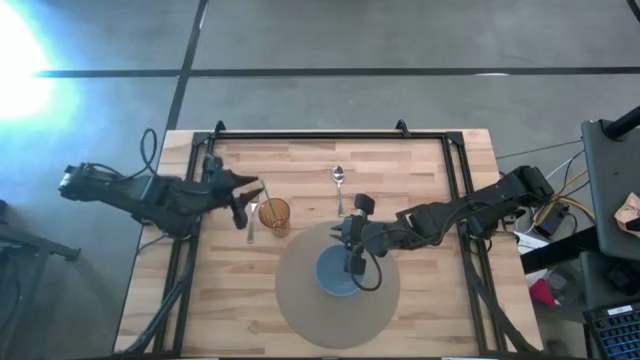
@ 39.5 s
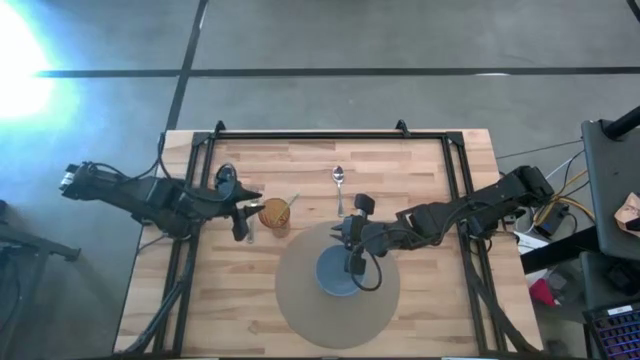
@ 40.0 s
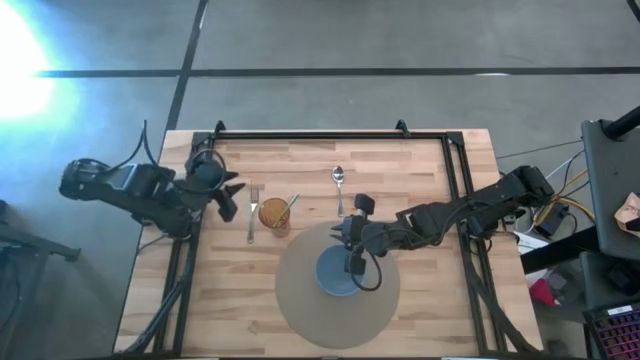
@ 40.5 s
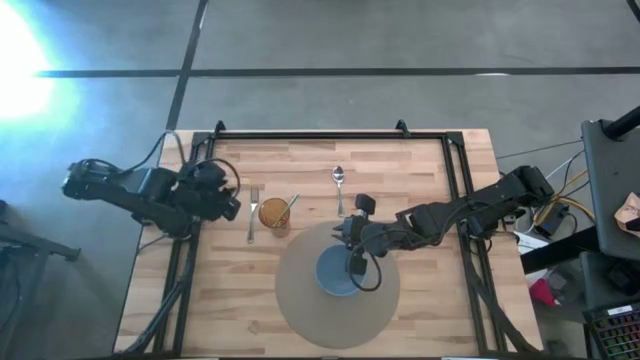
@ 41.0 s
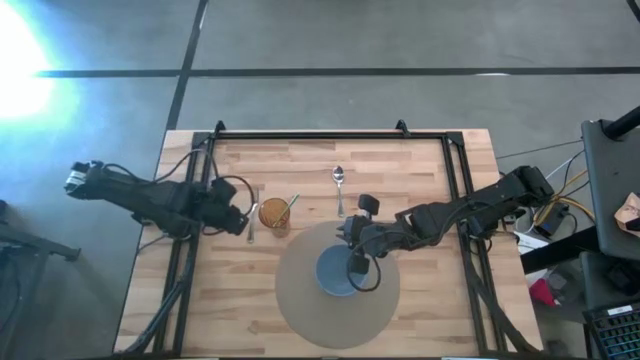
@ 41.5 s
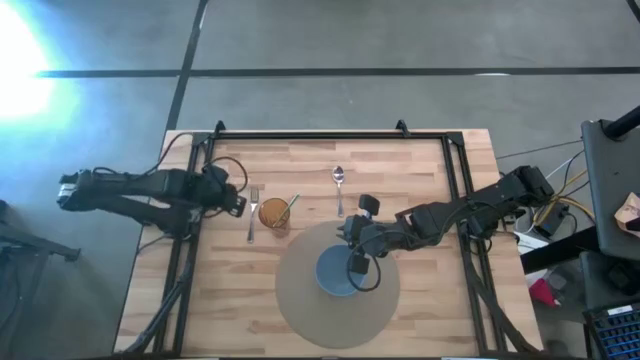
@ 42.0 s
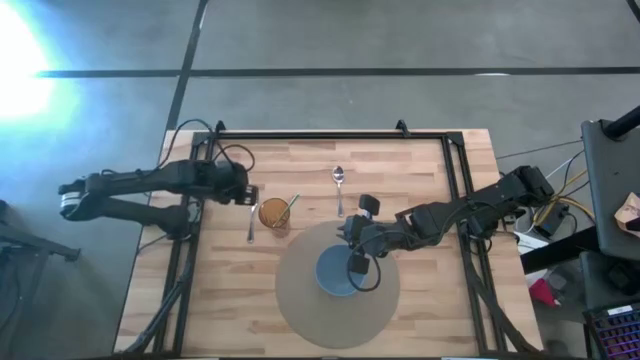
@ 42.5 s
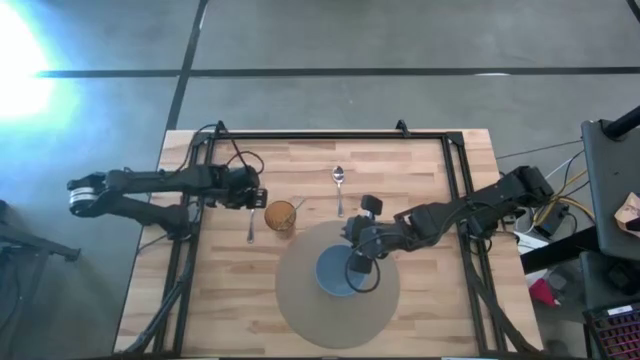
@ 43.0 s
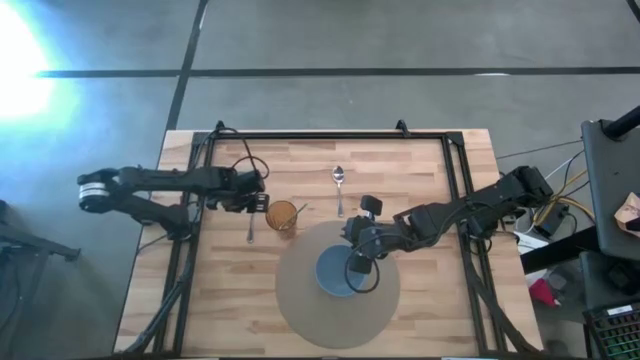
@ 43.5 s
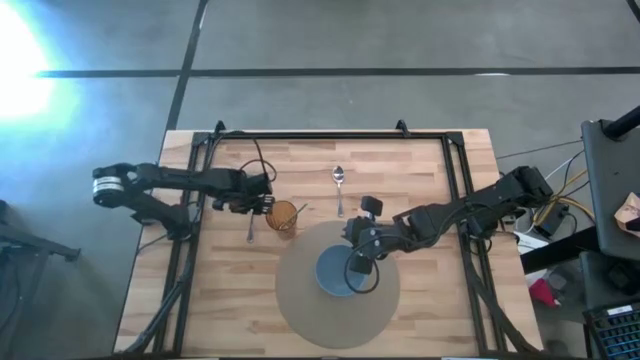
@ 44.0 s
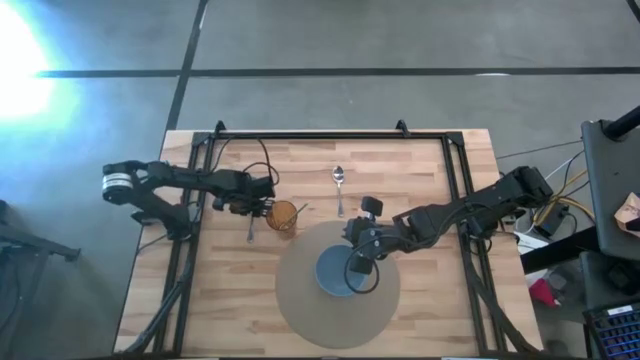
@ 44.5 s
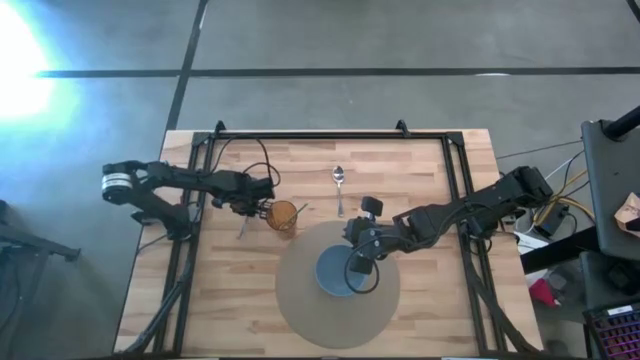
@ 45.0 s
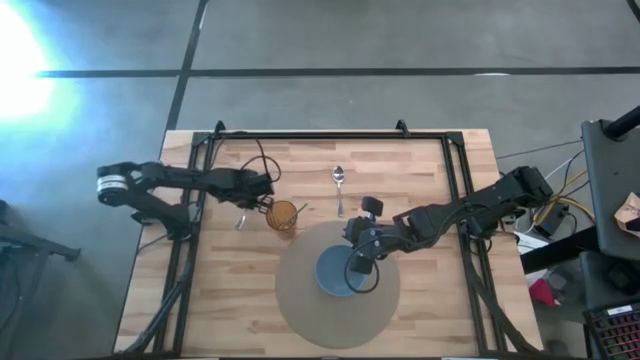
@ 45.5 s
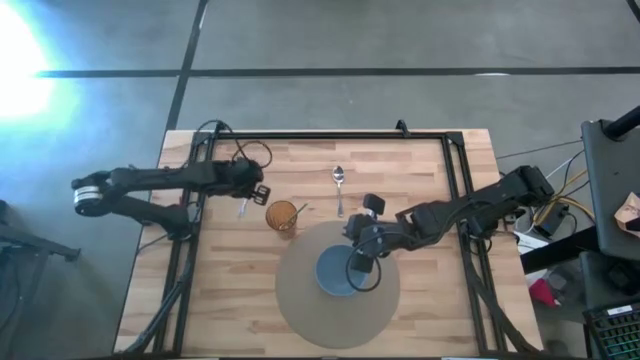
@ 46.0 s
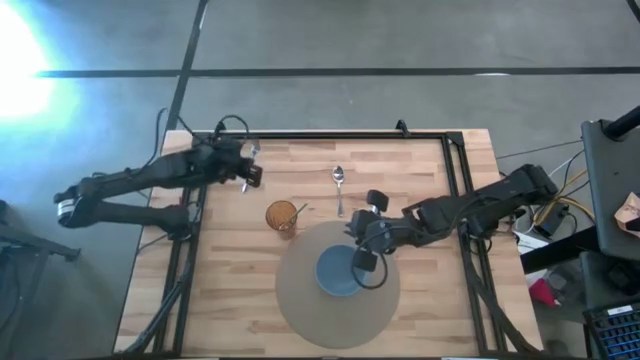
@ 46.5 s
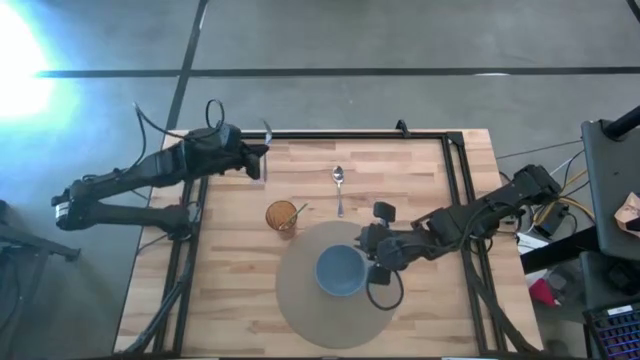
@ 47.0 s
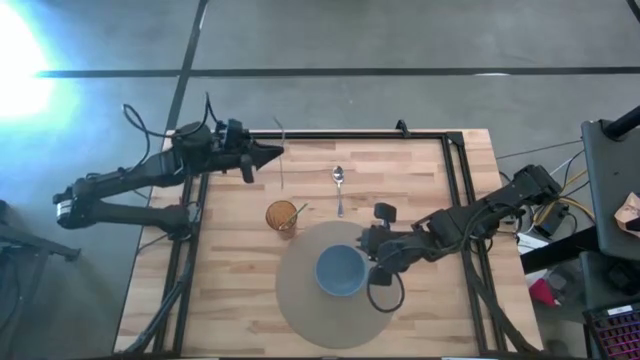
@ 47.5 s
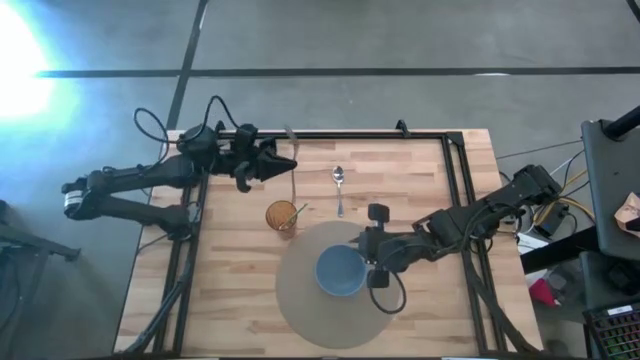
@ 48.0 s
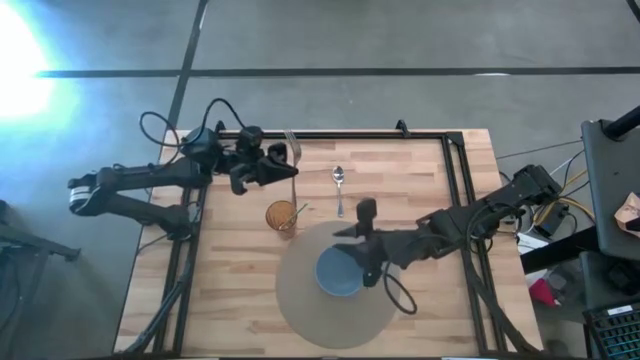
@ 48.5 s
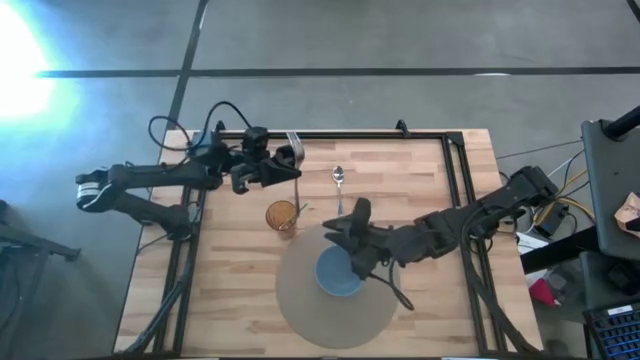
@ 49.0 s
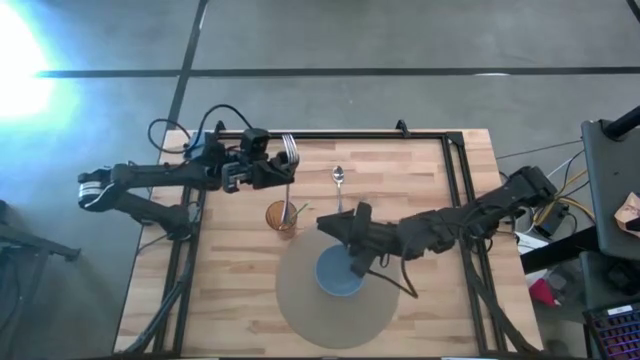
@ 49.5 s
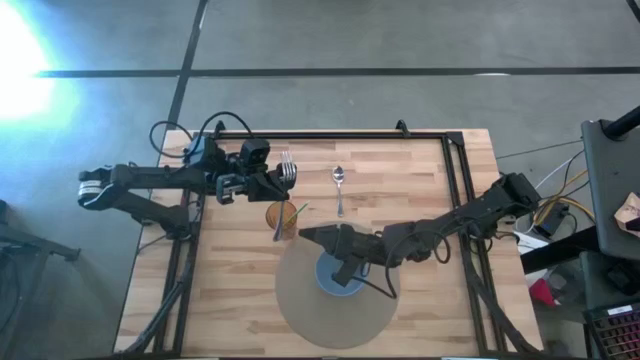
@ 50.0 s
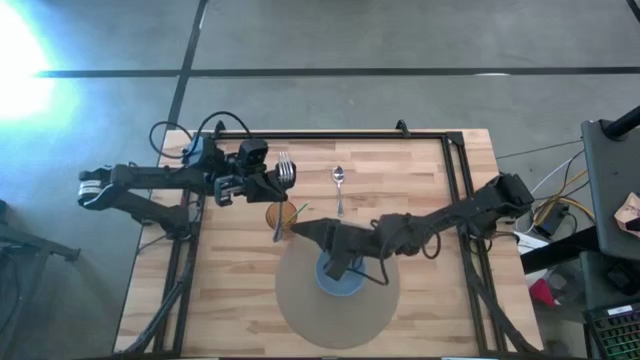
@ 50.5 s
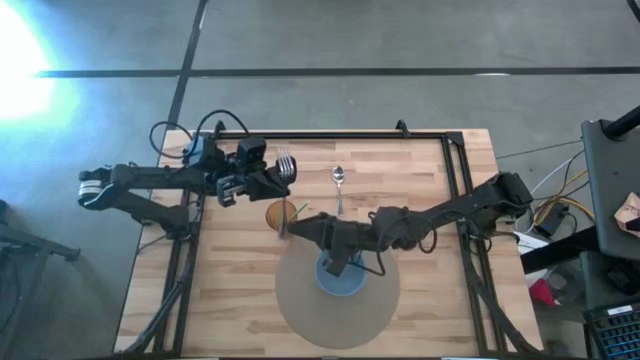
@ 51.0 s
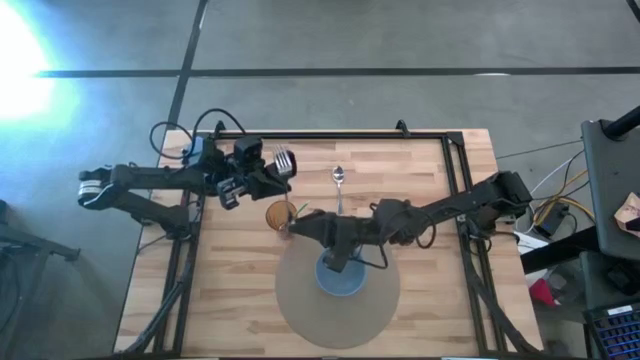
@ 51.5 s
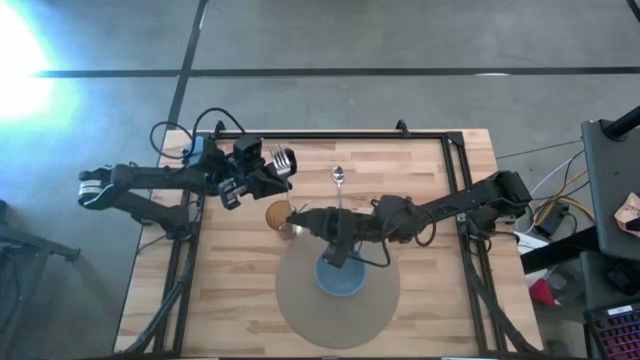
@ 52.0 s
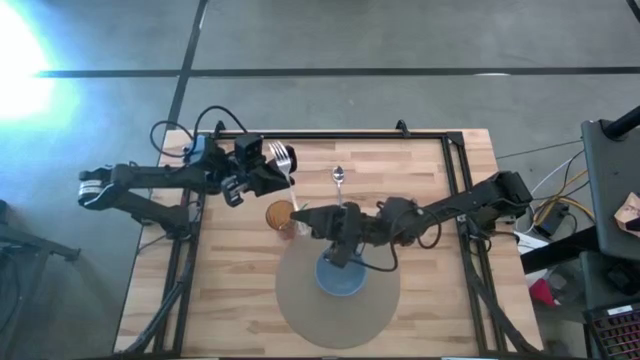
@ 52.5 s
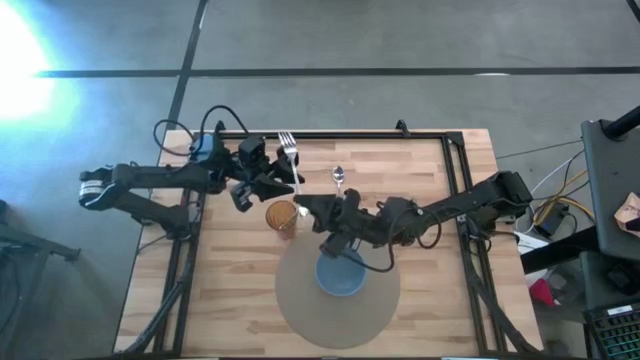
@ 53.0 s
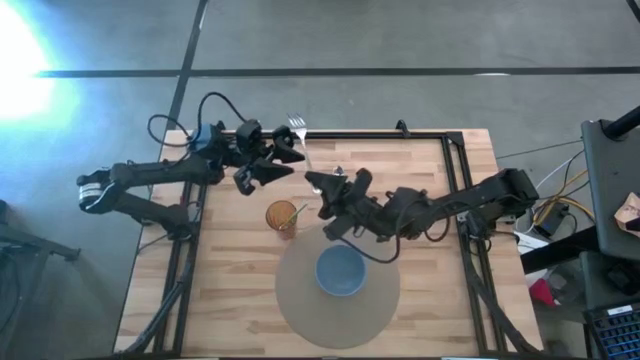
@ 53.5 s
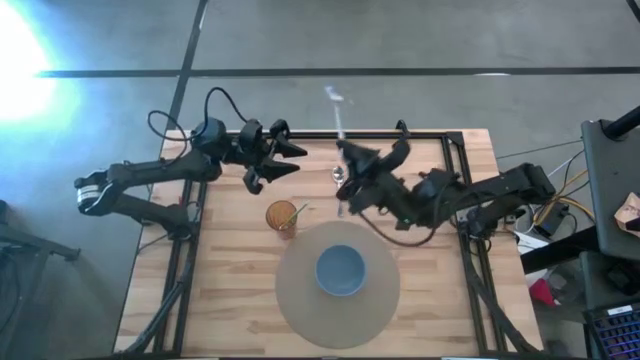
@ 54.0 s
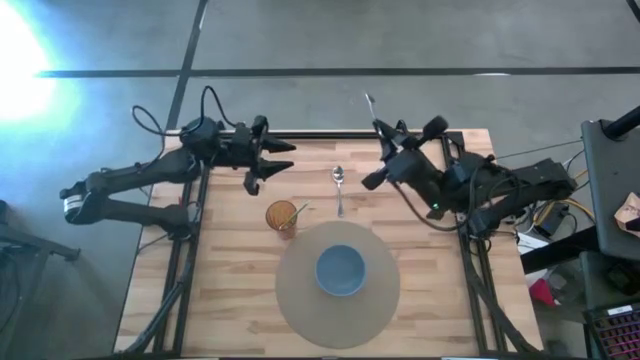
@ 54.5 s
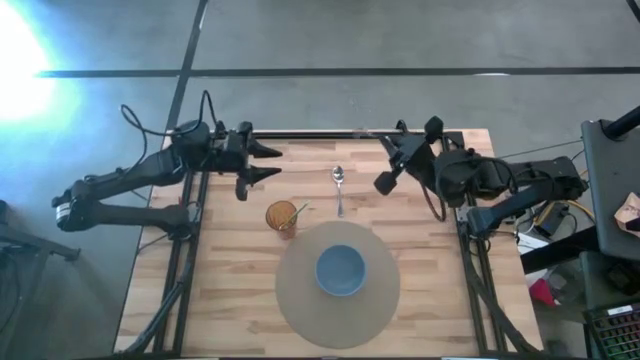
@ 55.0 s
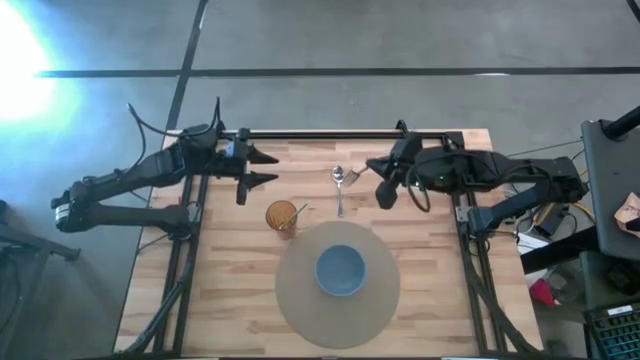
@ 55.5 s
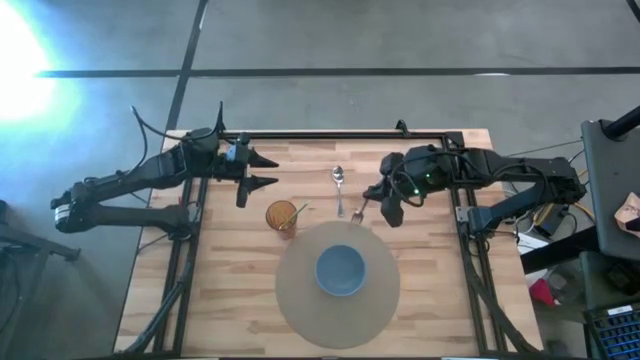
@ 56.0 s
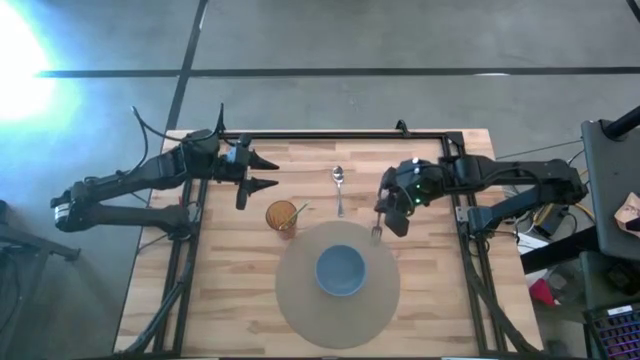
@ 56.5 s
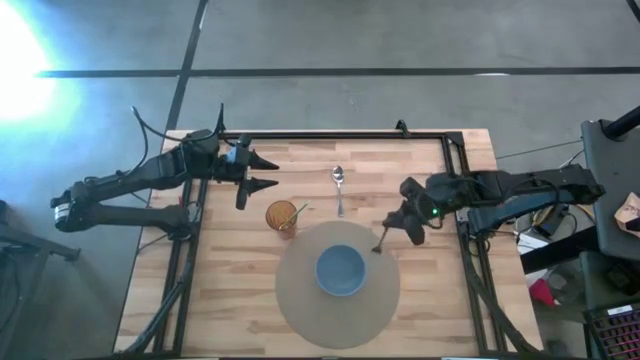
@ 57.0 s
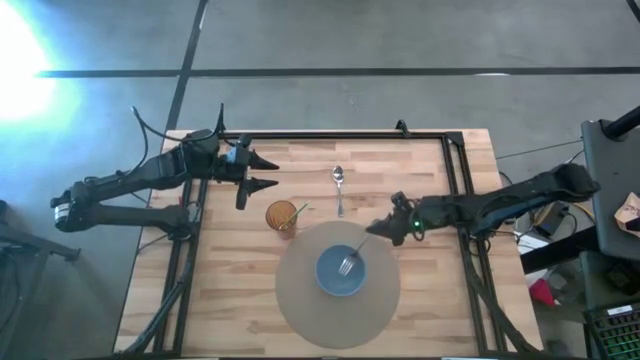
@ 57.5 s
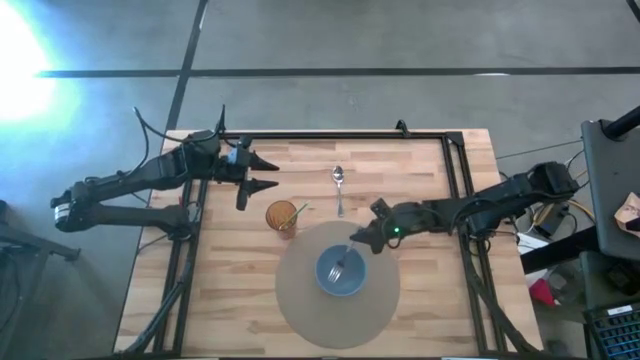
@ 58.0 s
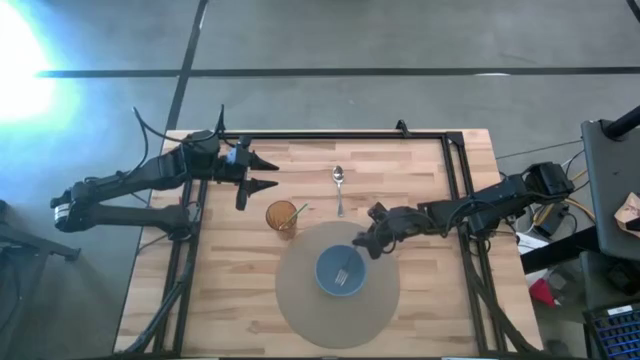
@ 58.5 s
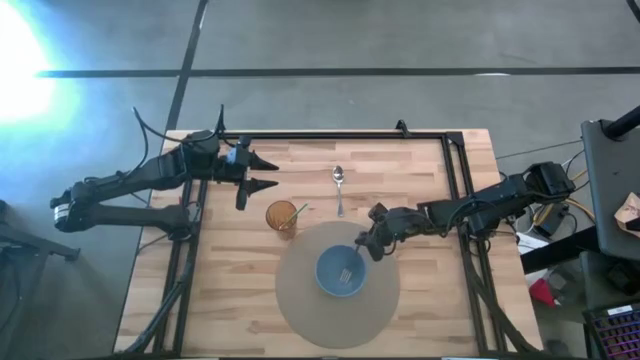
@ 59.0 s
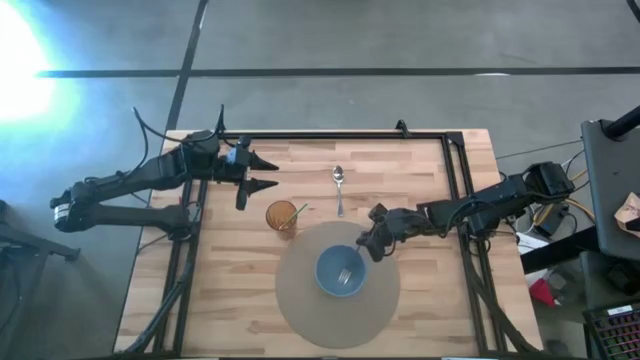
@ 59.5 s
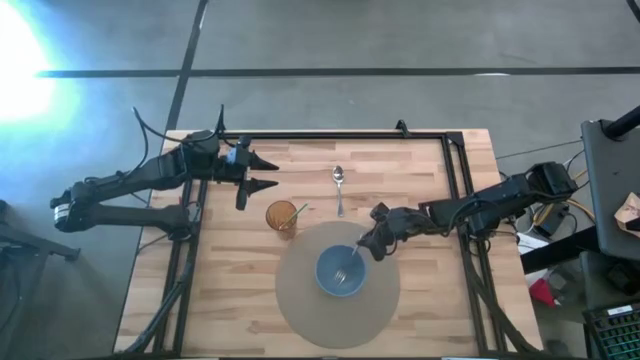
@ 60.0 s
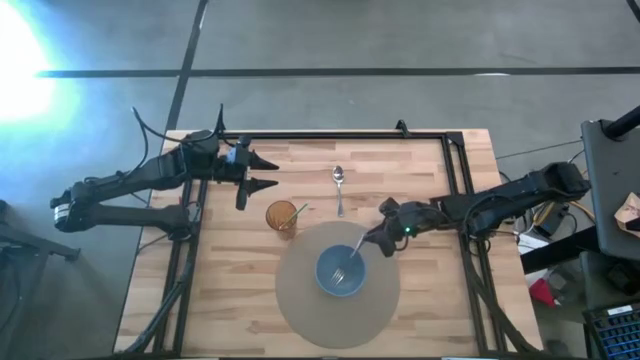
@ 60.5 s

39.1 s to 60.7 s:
Task: Pick & Place Utensil
Put the silver fork into the blue bowl
